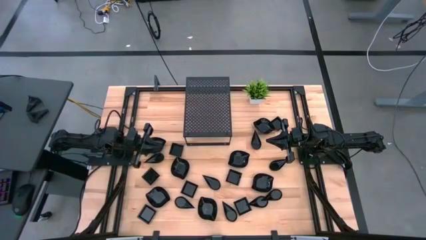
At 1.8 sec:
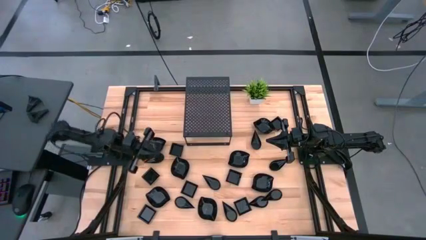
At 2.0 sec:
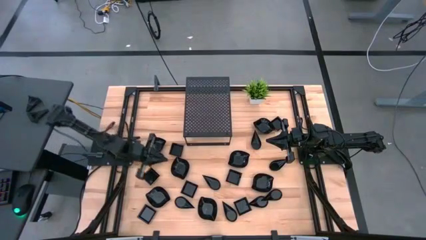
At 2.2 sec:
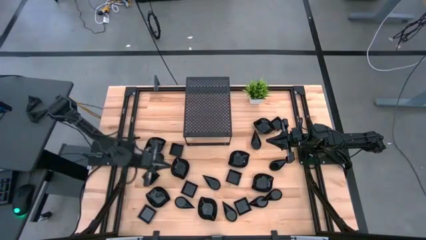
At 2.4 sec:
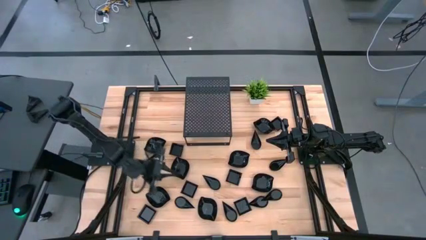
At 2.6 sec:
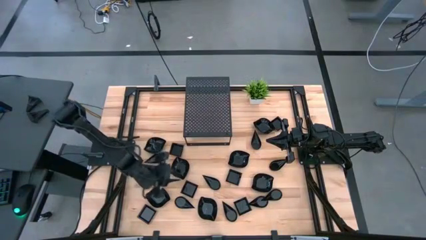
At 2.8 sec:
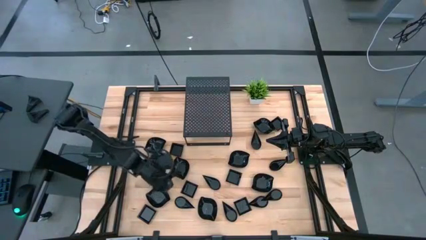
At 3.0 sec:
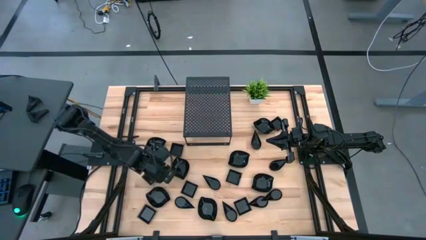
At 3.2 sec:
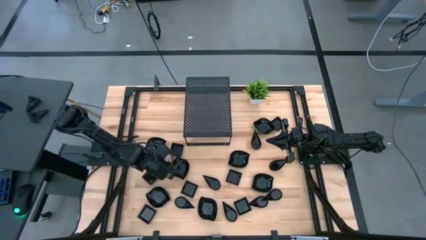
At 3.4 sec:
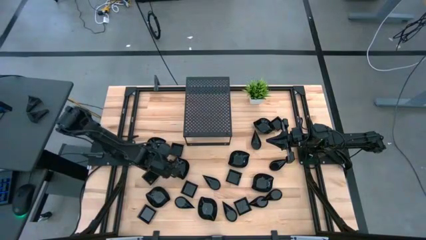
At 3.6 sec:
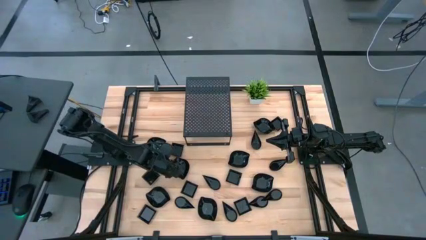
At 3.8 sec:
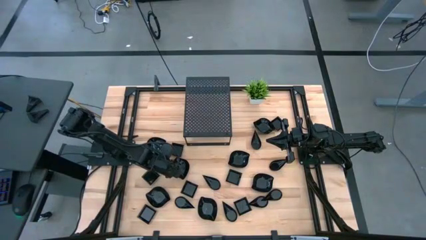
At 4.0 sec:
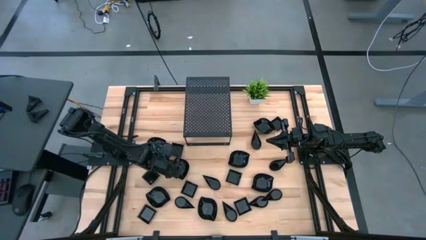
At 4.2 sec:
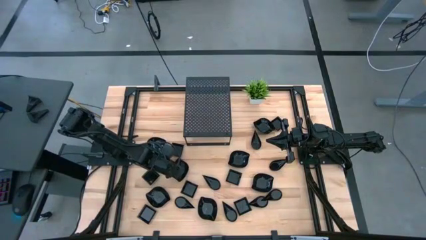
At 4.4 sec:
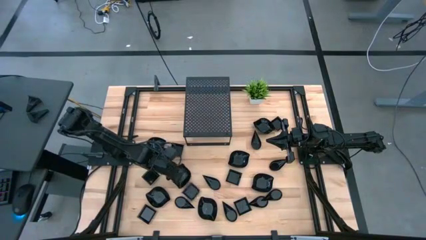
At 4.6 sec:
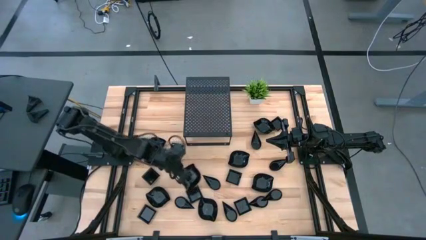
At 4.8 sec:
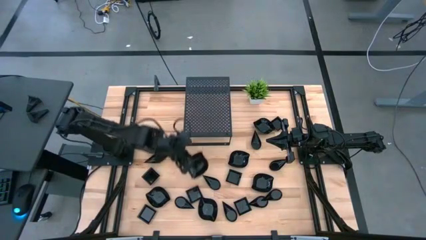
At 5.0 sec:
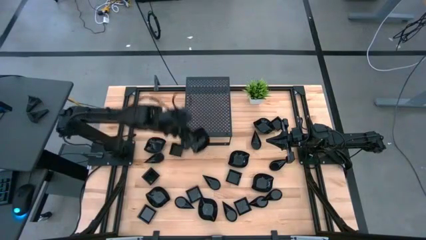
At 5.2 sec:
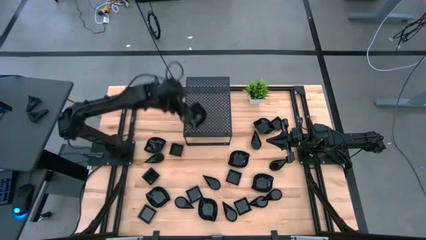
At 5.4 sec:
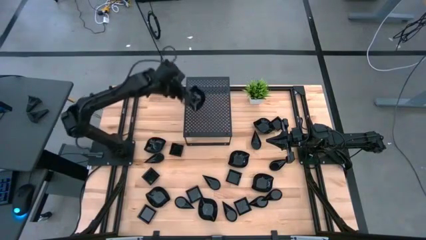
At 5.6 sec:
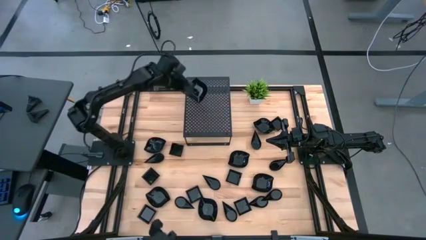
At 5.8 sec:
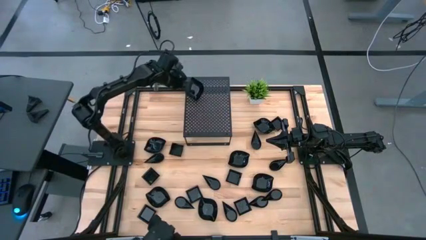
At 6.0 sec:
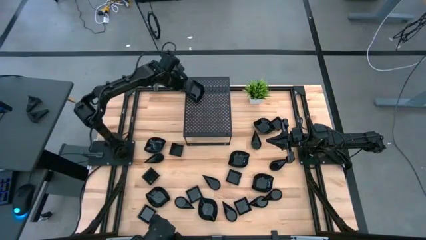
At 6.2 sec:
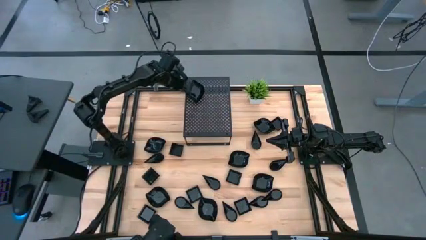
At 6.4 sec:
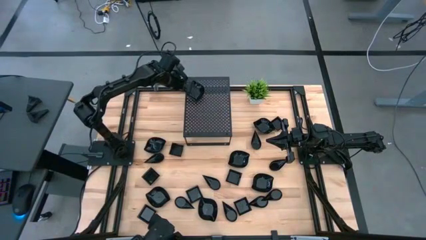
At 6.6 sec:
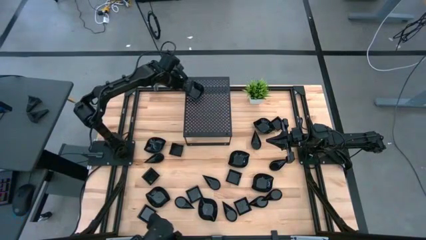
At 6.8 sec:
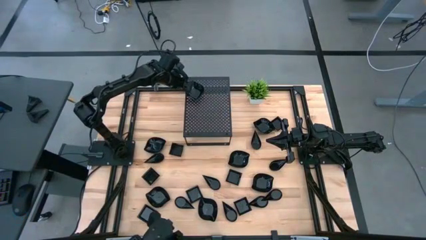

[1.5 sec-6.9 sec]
Task: Pick & Place Mini shaped plates
Put the leaf shaped plate on the shelf

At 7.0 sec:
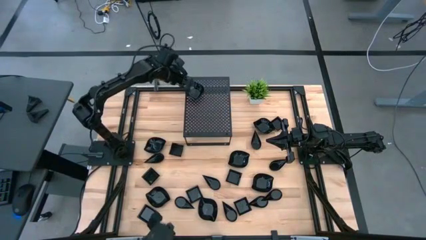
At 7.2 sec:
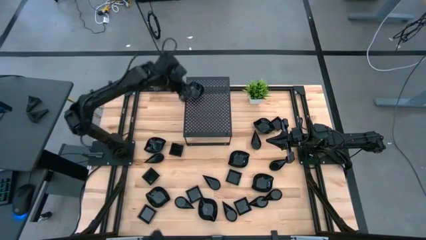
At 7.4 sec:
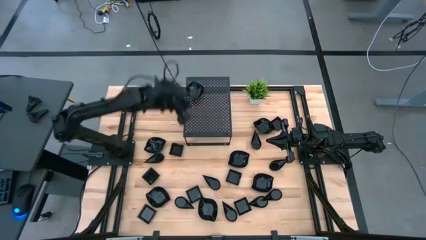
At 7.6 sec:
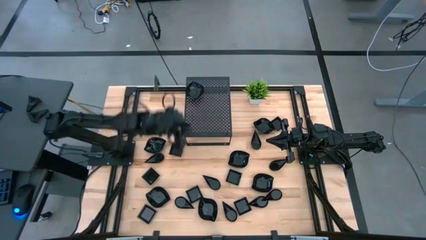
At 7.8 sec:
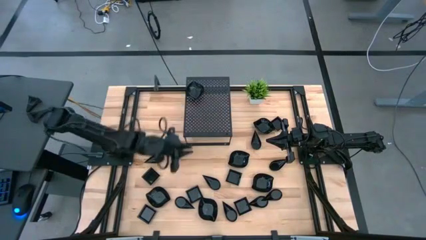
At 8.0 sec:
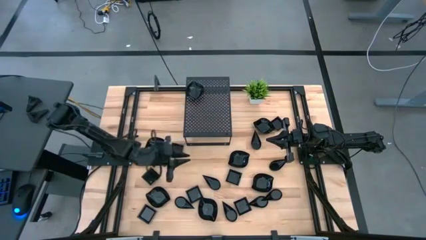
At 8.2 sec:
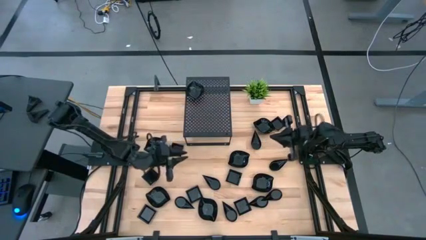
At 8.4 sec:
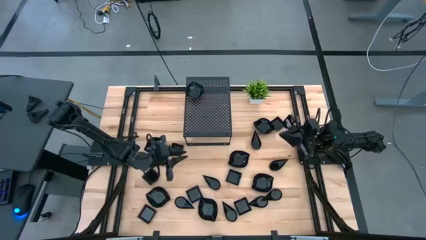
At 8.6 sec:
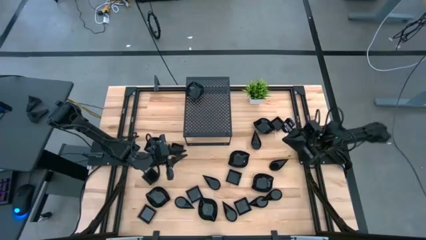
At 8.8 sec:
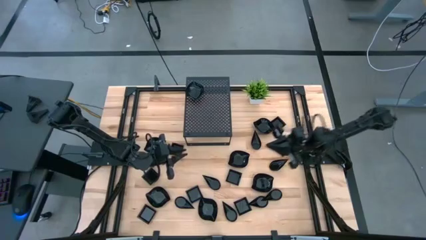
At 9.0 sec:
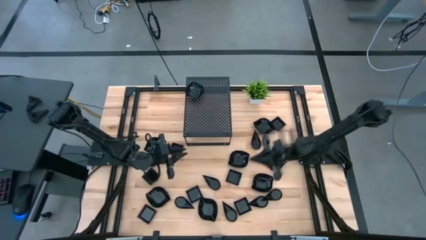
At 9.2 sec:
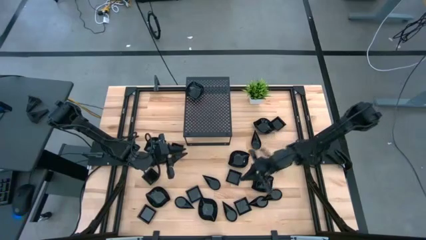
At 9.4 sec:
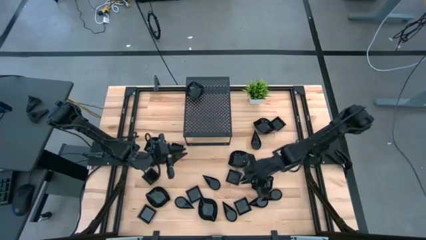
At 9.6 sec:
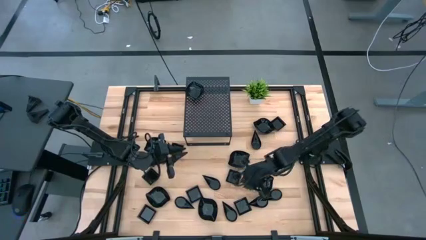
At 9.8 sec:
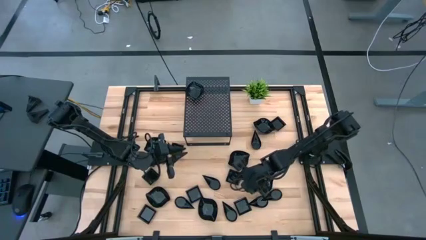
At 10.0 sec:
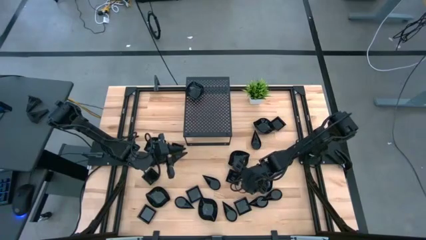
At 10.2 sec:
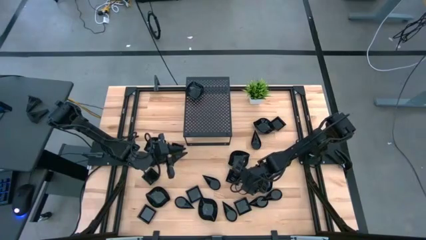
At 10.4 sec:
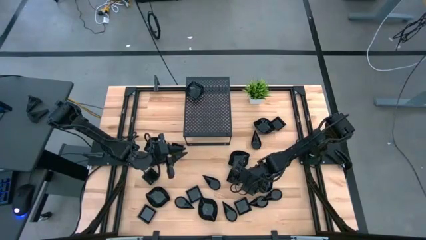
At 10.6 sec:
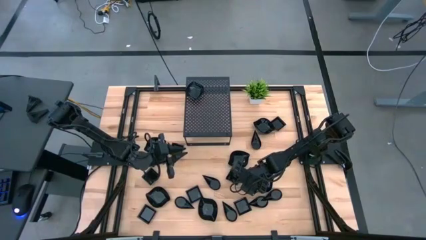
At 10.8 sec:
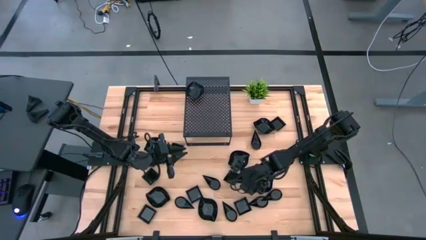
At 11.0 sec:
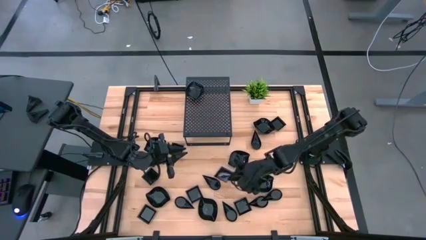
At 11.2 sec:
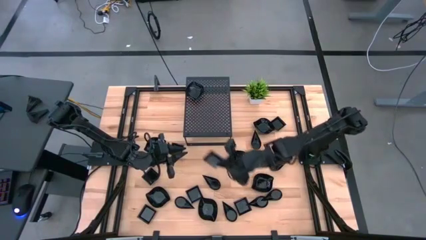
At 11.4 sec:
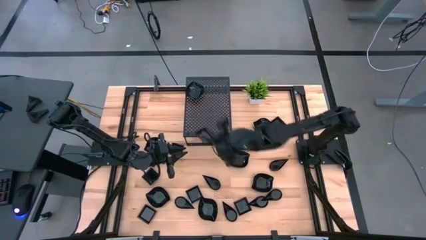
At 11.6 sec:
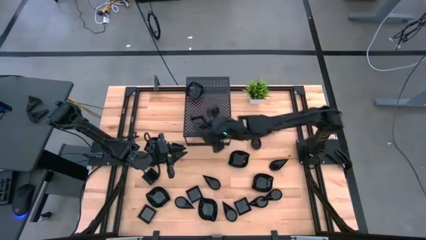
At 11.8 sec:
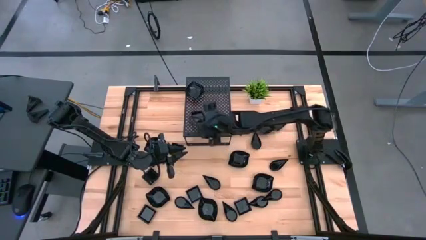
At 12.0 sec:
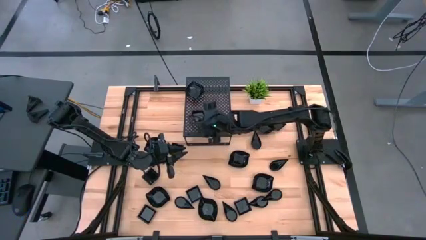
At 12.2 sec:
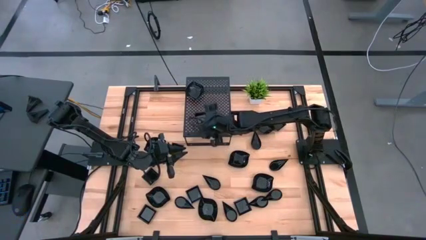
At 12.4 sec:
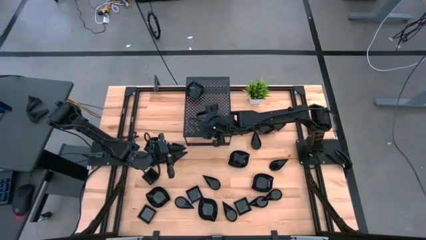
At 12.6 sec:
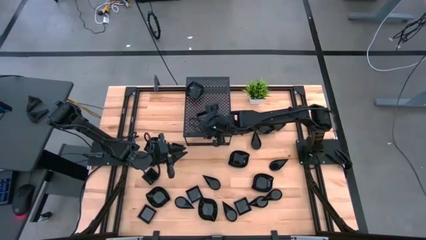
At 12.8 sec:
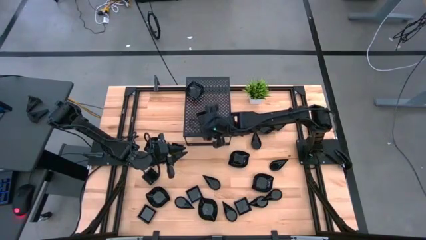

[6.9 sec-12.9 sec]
Put the square plate on the shelf

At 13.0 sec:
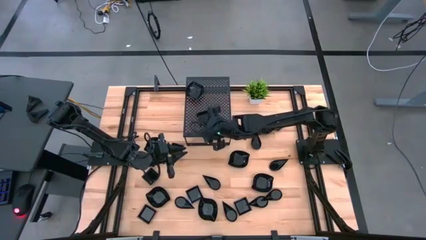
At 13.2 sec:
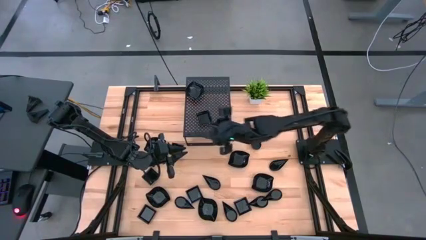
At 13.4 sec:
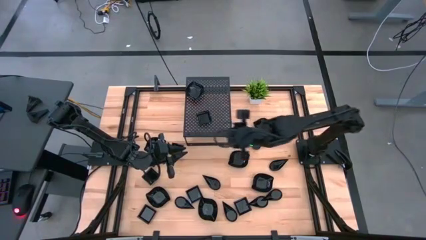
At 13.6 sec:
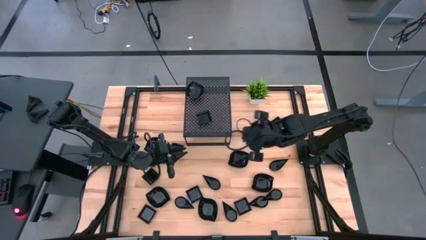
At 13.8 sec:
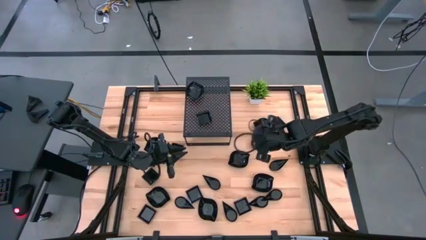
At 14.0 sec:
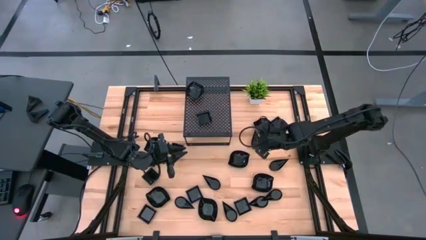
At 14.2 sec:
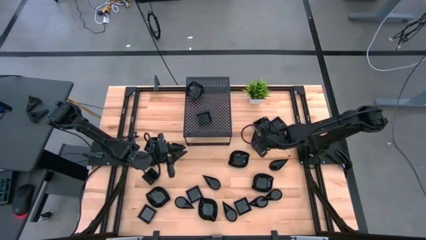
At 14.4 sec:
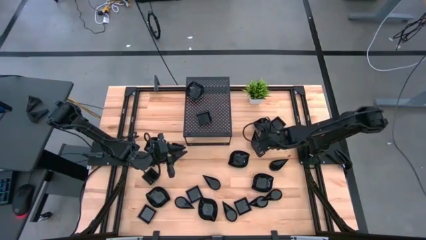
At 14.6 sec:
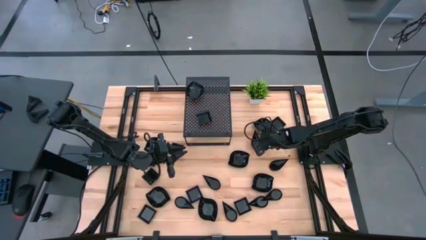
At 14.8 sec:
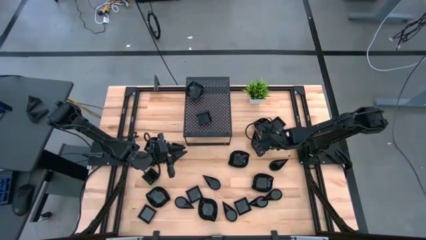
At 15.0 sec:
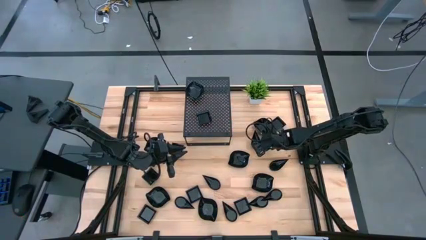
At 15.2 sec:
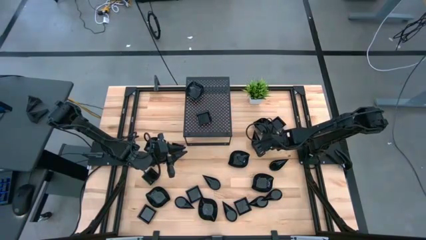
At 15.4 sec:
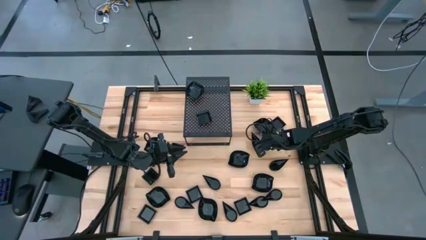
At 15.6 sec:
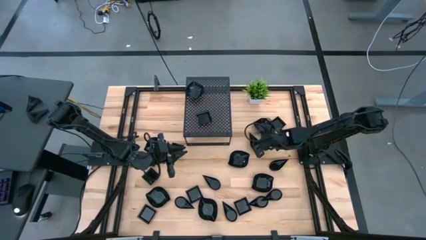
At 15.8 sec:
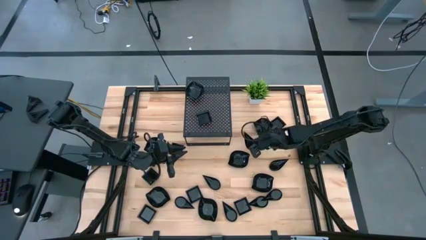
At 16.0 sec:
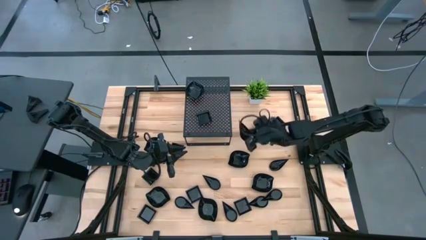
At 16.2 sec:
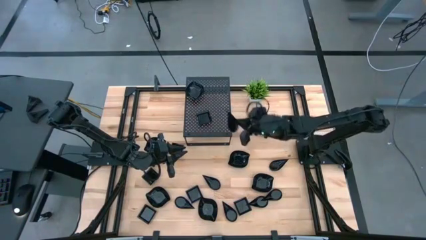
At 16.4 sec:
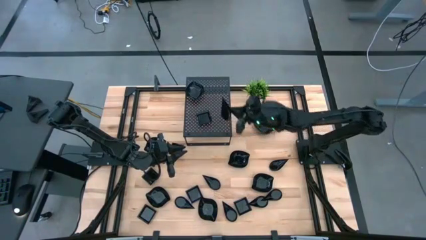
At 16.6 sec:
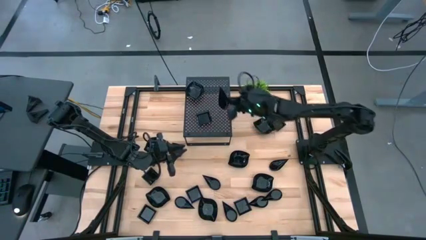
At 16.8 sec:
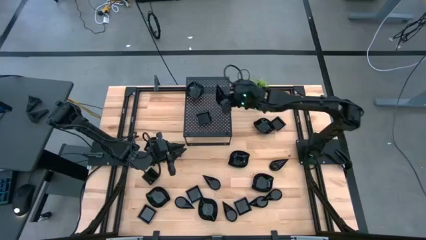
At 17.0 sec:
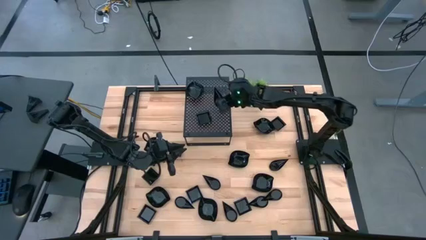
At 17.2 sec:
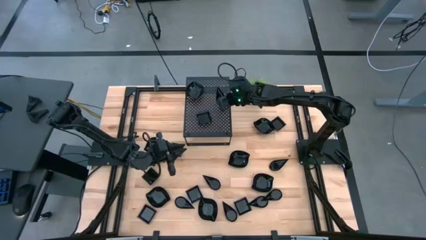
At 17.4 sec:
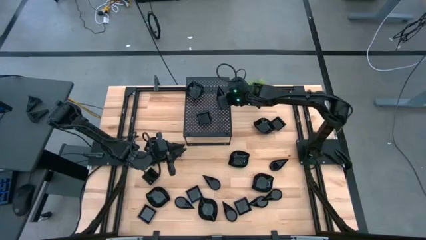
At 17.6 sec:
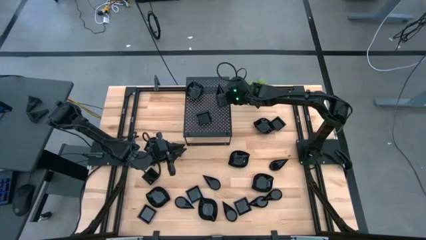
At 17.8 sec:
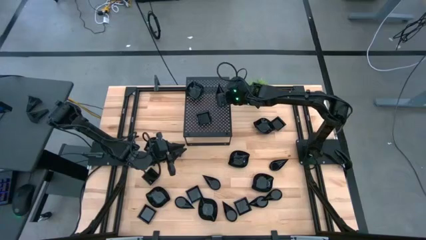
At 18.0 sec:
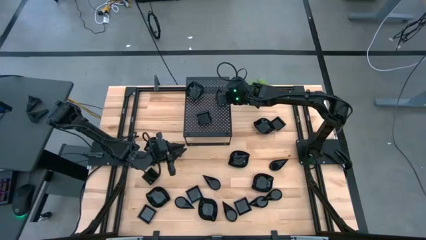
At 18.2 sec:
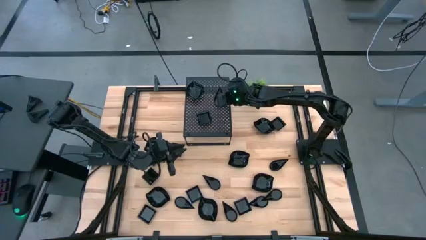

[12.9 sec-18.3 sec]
Put the drop shaped plate on the shelf
